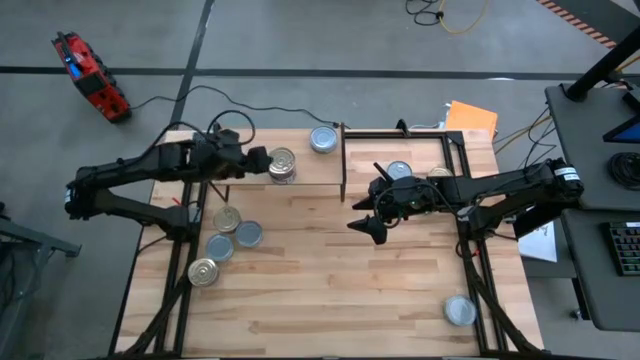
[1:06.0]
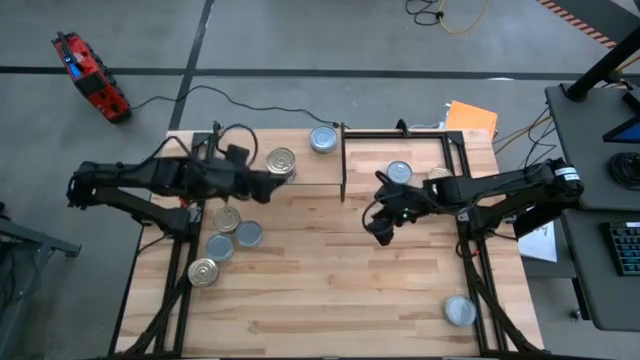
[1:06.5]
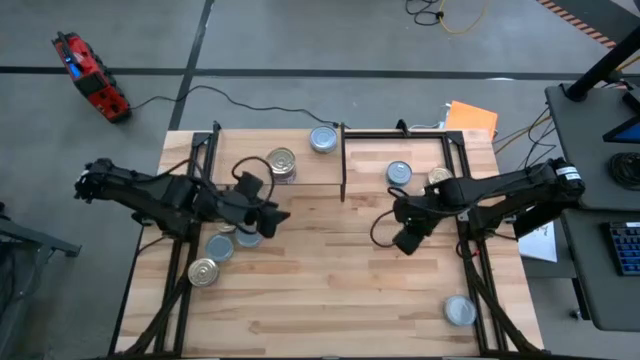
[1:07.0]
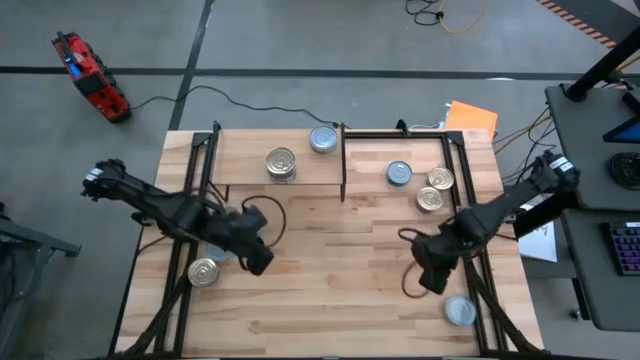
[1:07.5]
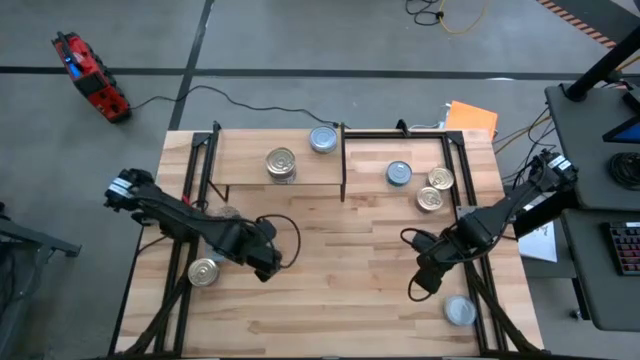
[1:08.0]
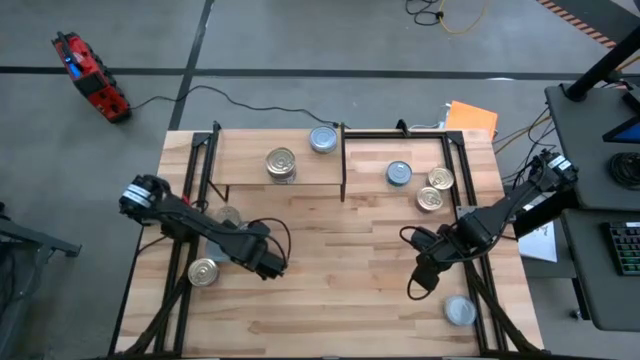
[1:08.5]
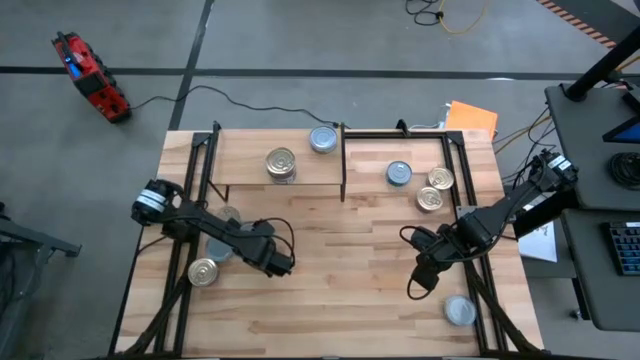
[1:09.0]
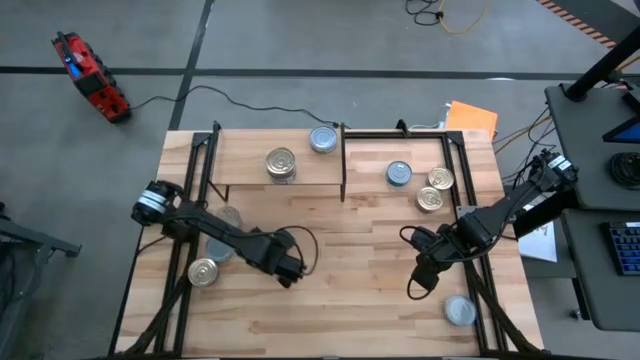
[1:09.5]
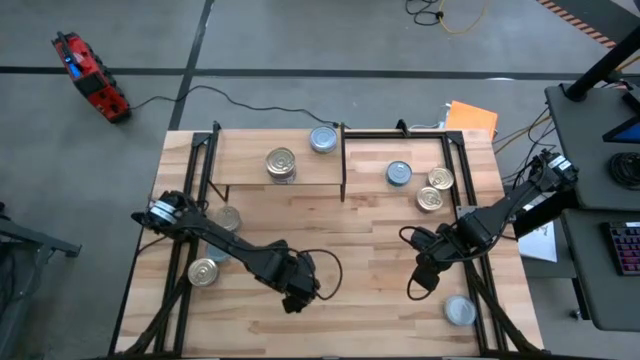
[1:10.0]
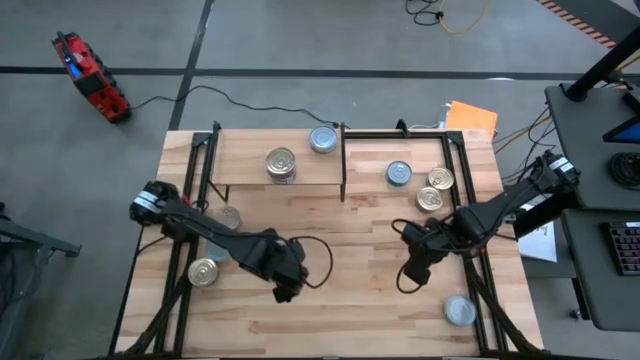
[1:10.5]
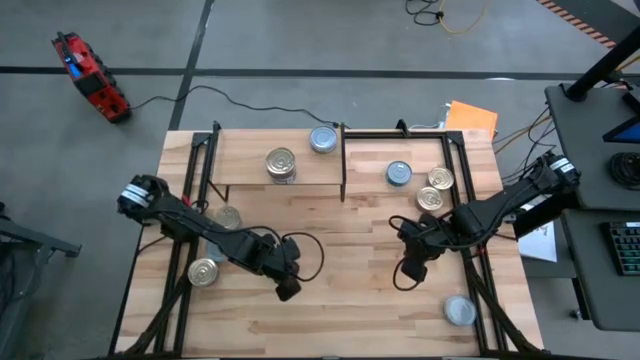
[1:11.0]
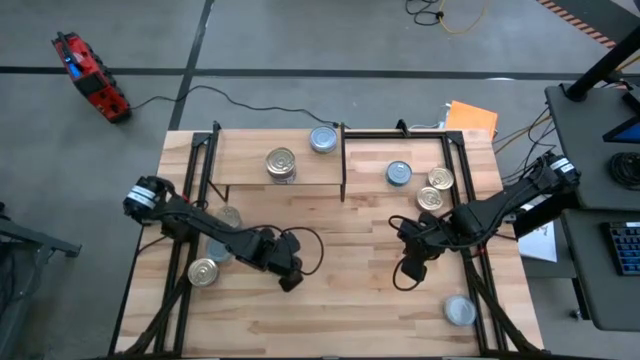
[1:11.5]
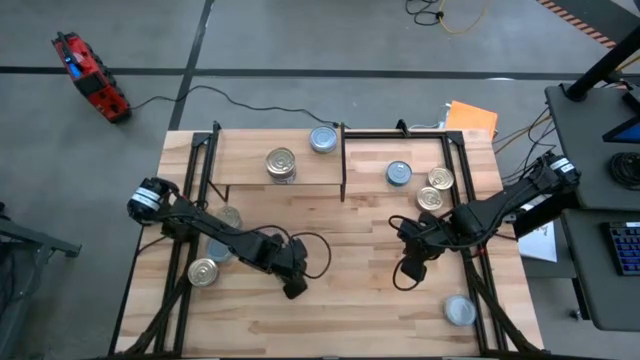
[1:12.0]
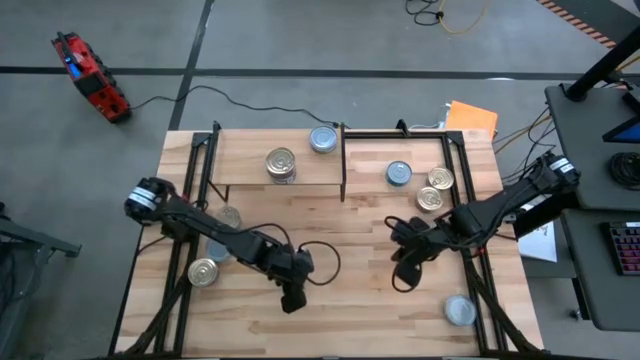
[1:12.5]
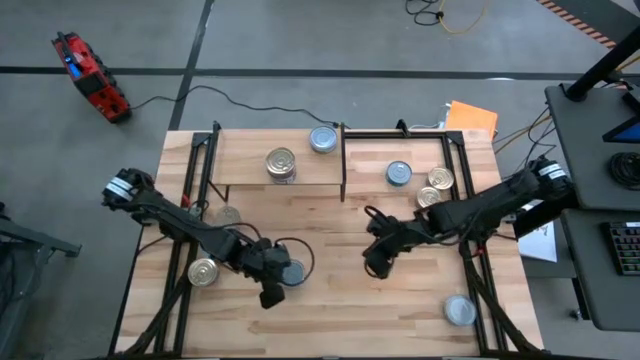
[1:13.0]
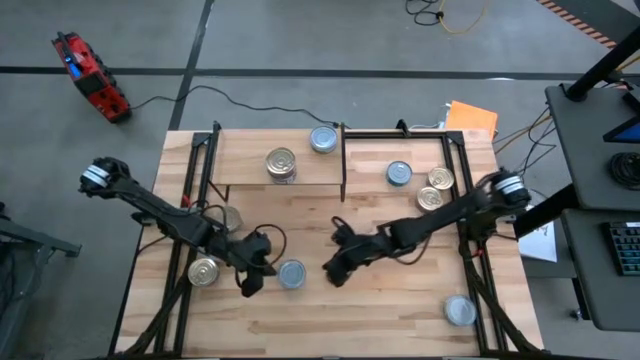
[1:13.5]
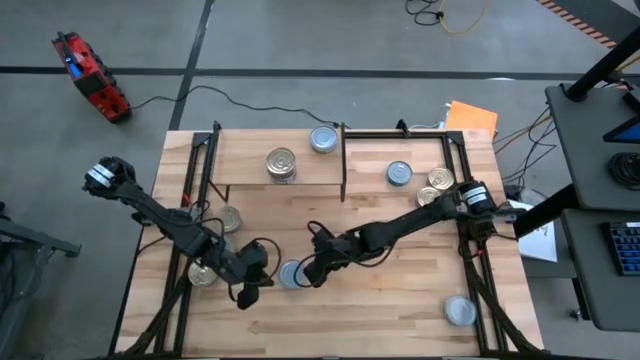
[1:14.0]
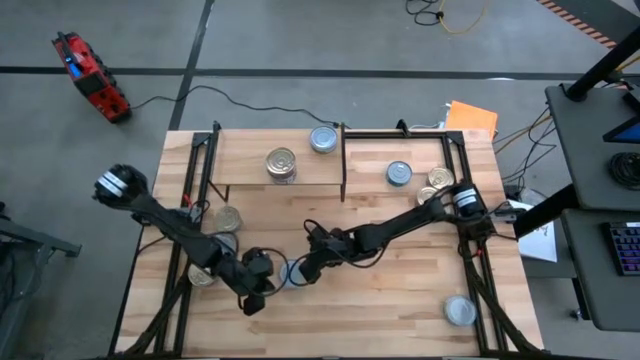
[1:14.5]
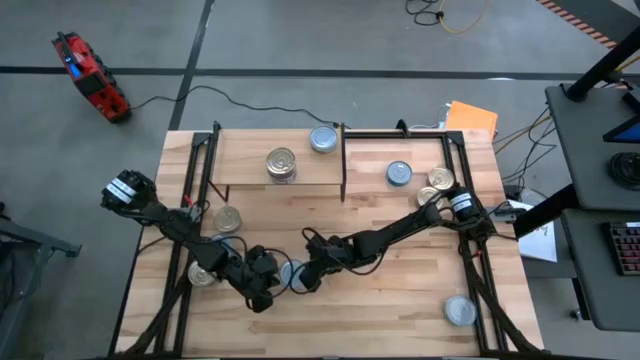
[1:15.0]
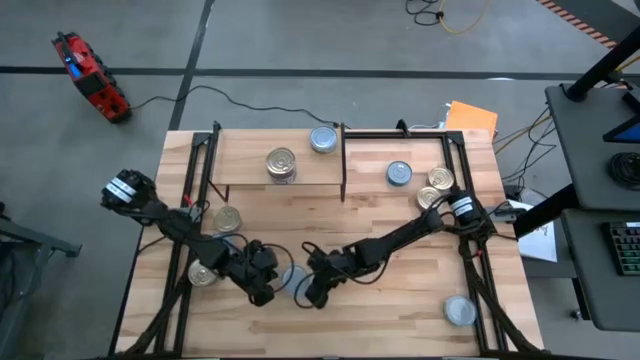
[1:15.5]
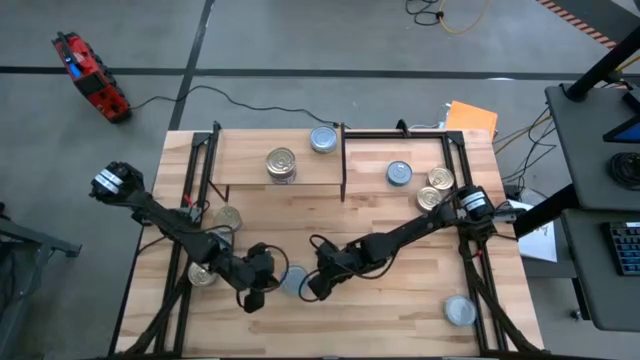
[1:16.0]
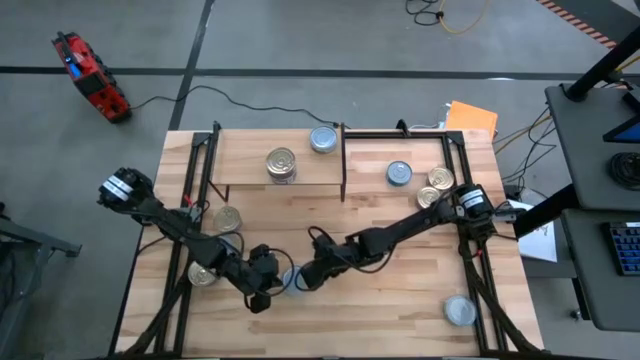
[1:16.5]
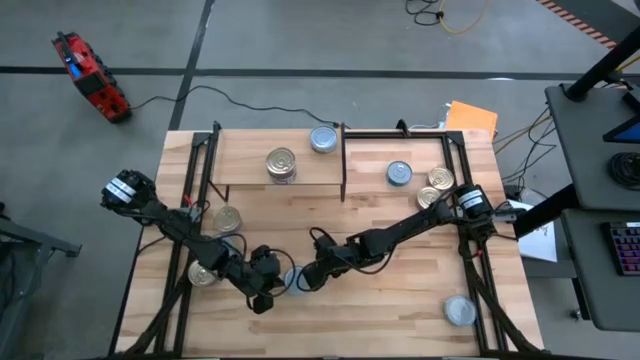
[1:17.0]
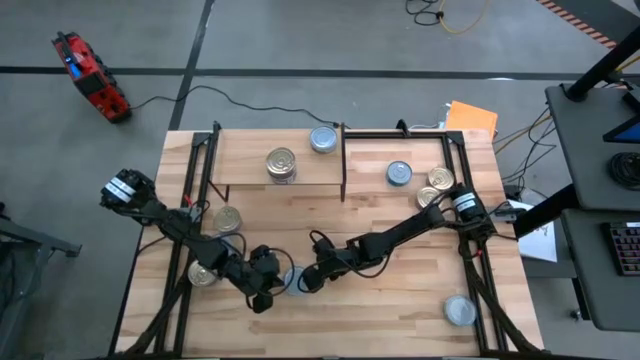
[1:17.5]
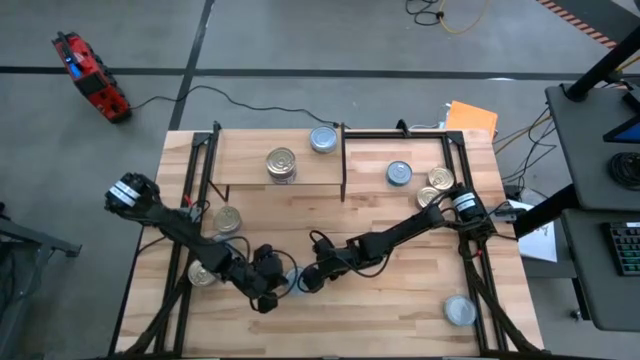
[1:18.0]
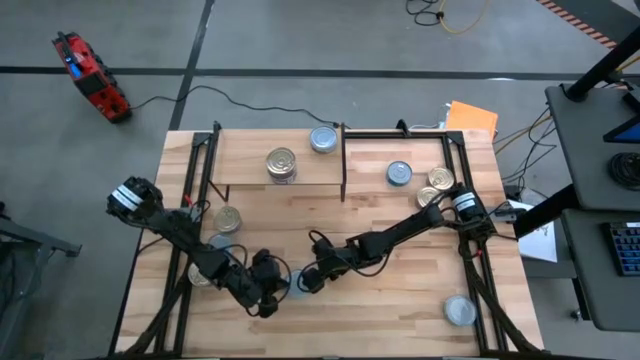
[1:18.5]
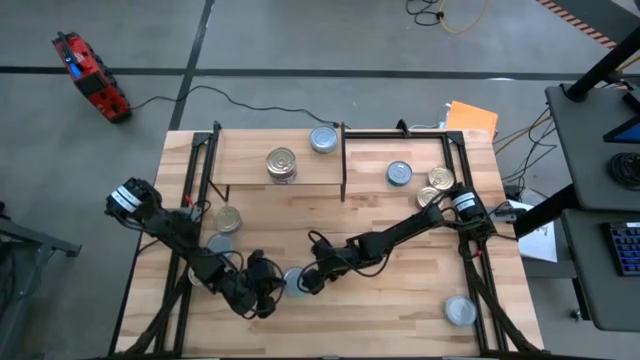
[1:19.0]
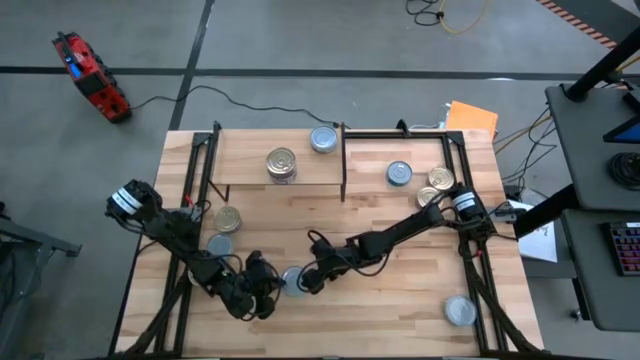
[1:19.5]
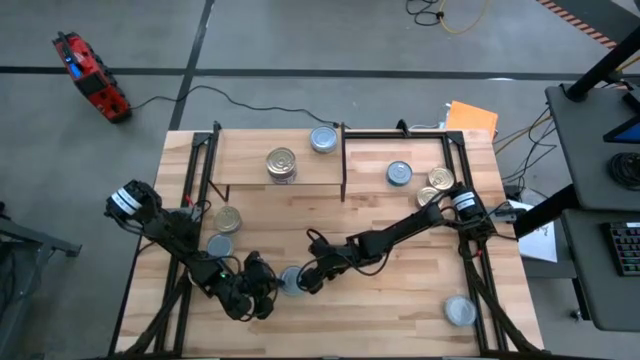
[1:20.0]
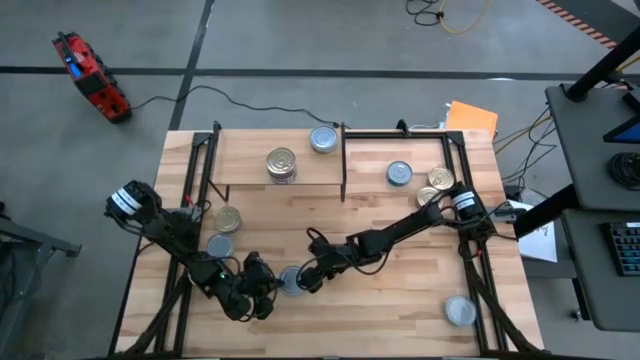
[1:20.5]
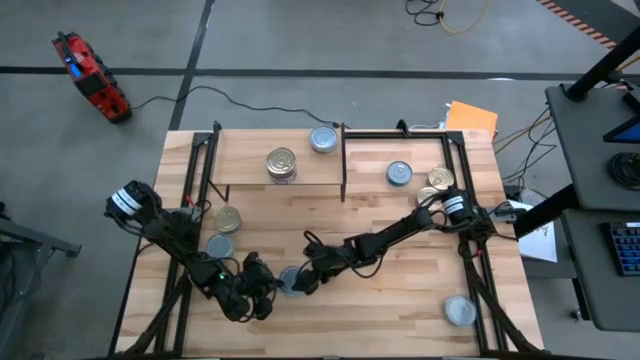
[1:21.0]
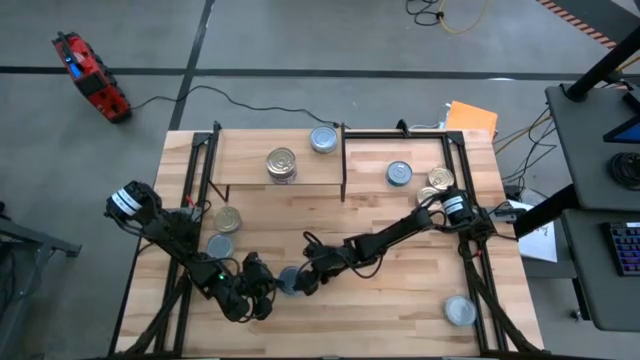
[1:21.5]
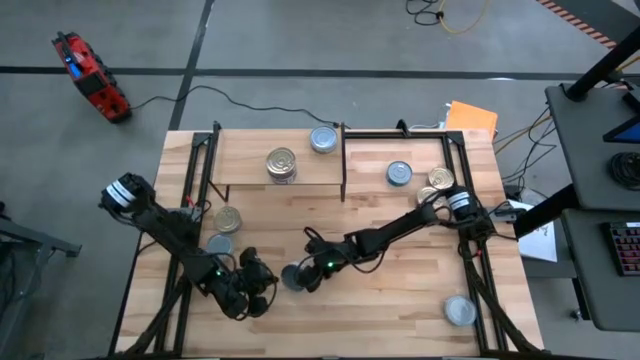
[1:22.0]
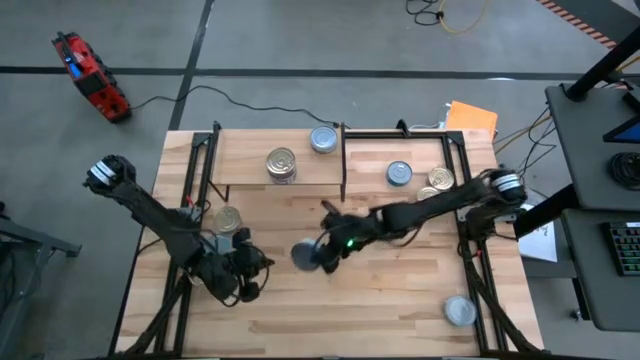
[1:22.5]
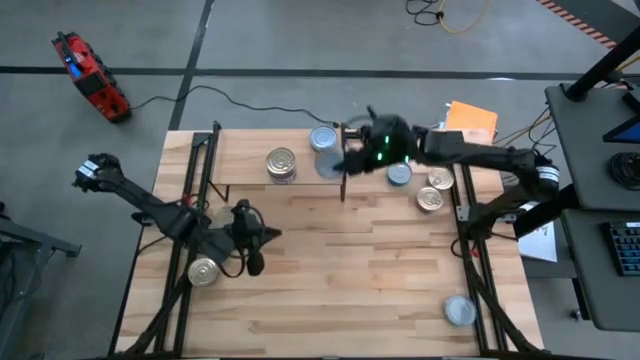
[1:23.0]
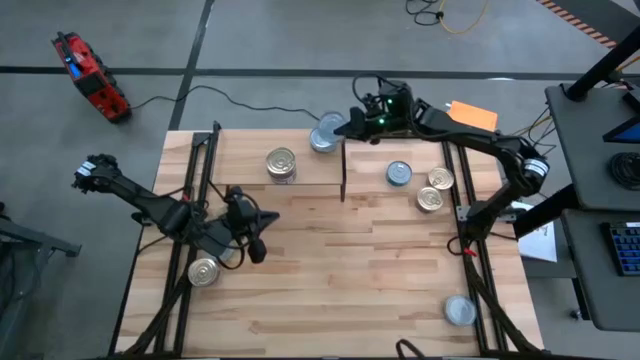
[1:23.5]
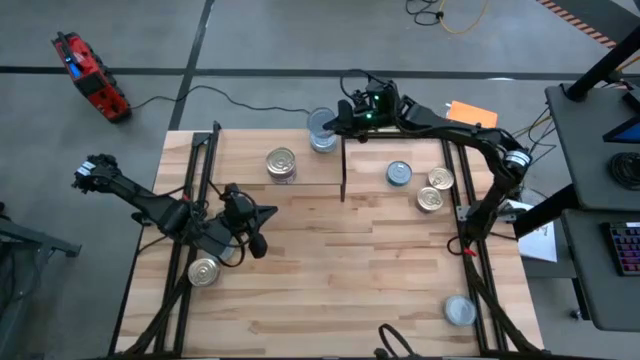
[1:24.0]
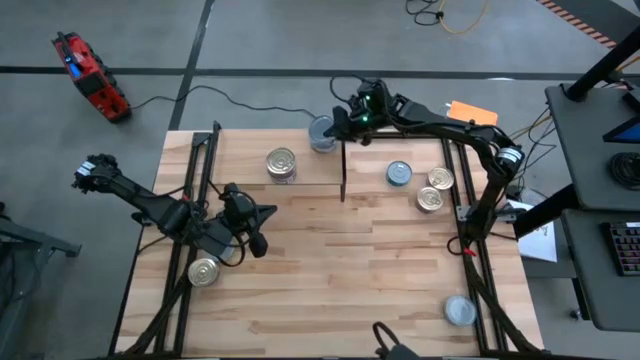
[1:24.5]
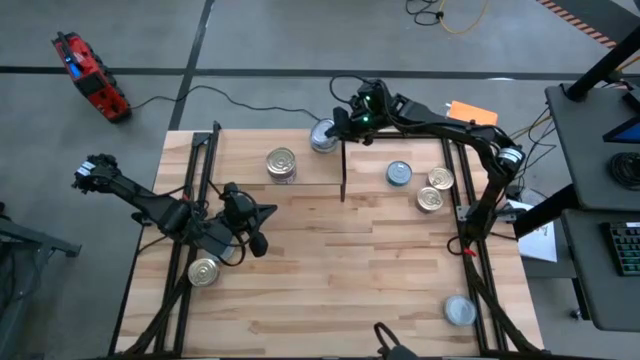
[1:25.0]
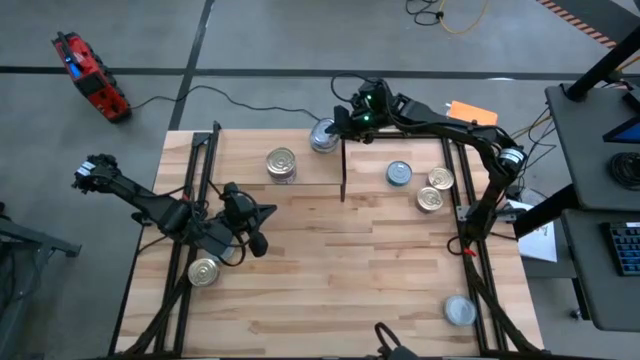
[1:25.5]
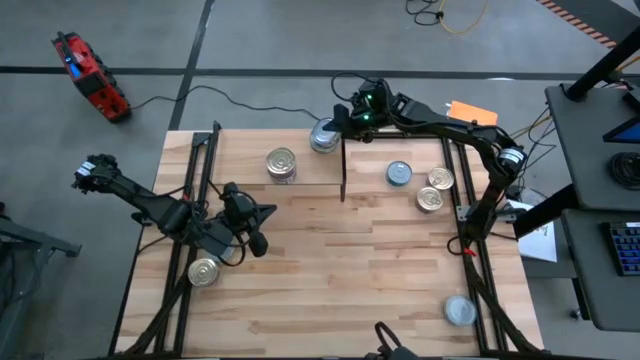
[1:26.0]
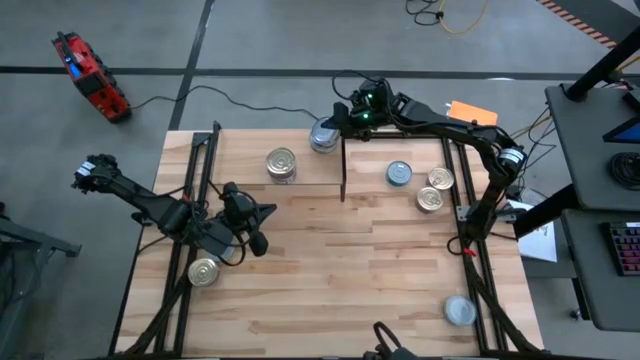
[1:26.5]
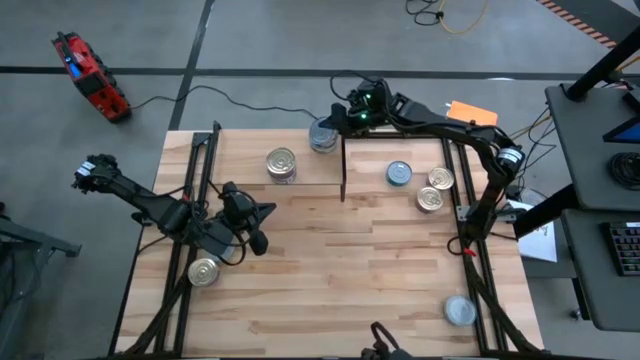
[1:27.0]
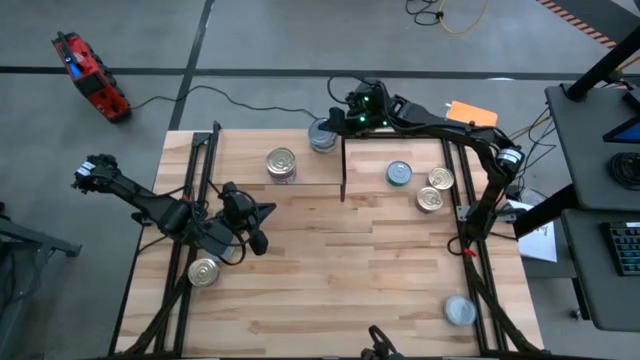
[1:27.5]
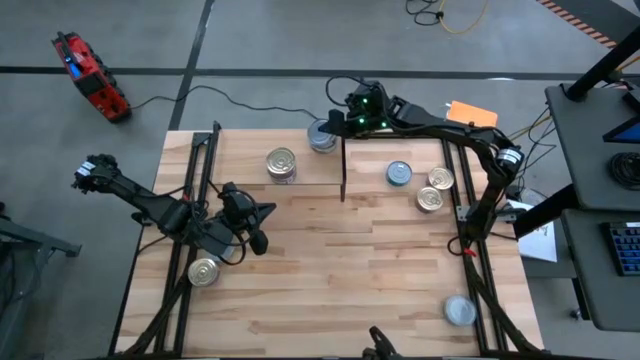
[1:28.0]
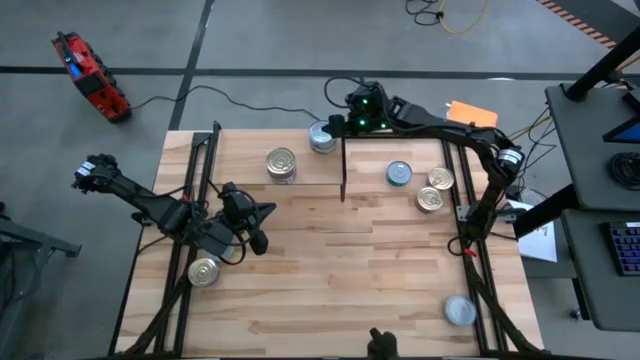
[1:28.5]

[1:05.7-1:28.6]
Task: Stack canned seafood by type on shelf
Stack the green tuna can on top of the green tuna can on the shelf
